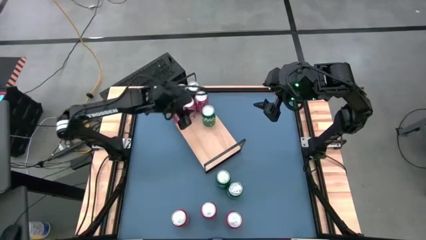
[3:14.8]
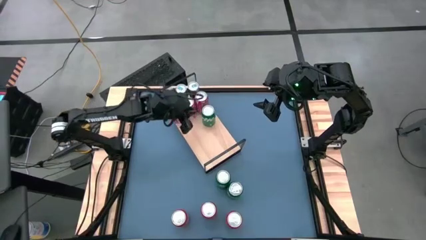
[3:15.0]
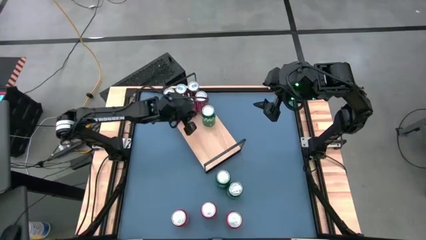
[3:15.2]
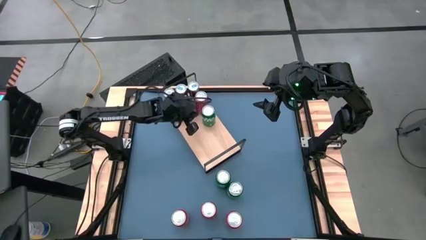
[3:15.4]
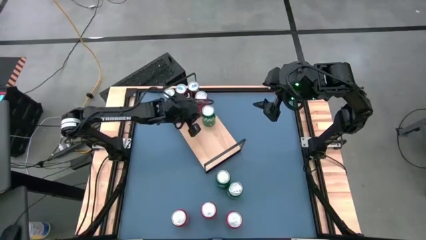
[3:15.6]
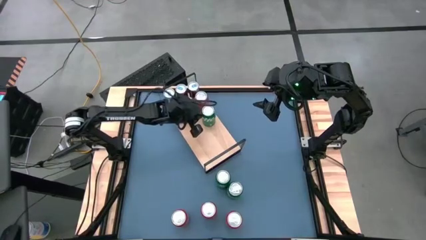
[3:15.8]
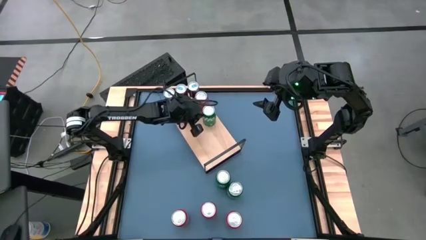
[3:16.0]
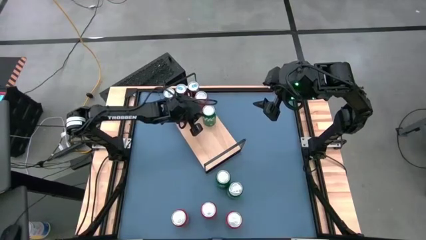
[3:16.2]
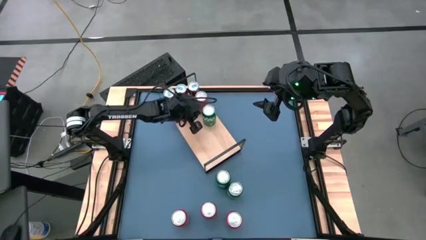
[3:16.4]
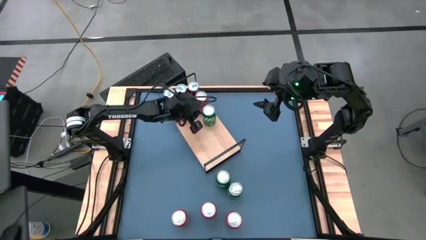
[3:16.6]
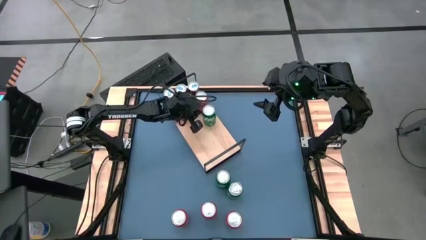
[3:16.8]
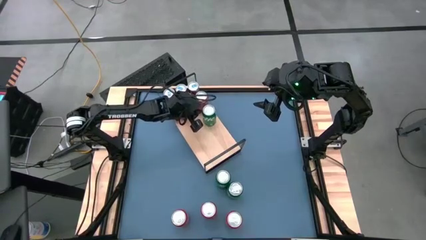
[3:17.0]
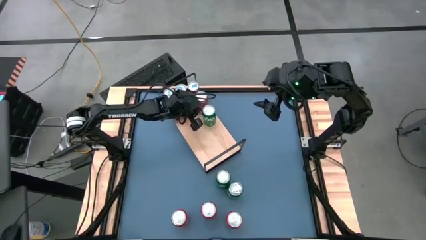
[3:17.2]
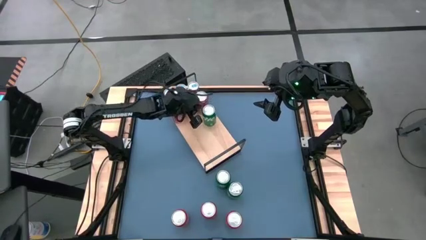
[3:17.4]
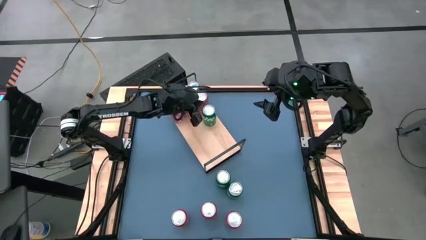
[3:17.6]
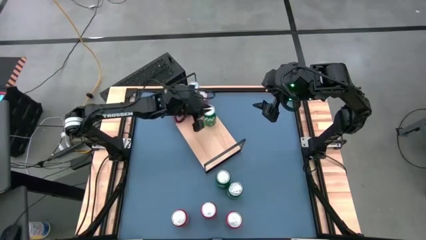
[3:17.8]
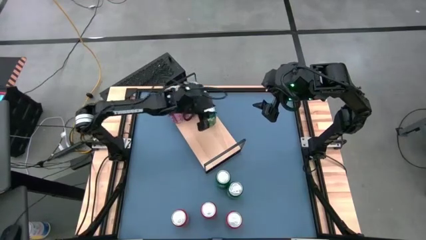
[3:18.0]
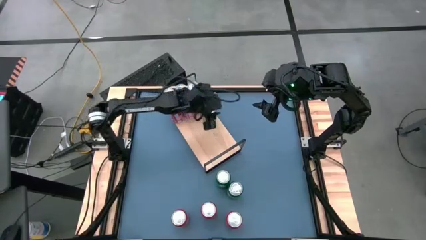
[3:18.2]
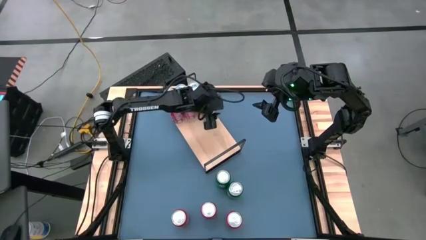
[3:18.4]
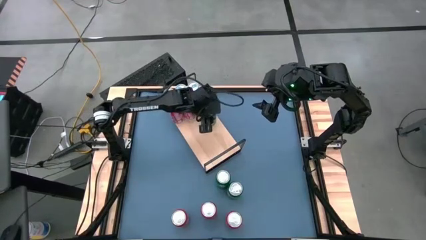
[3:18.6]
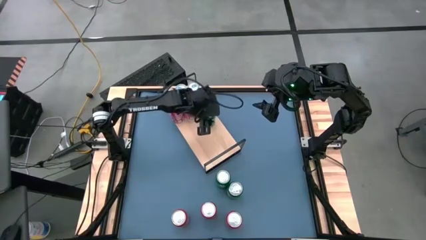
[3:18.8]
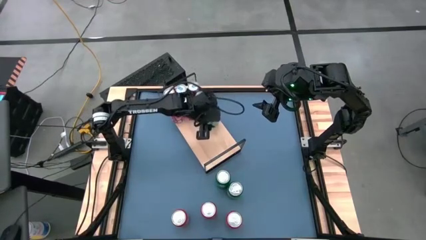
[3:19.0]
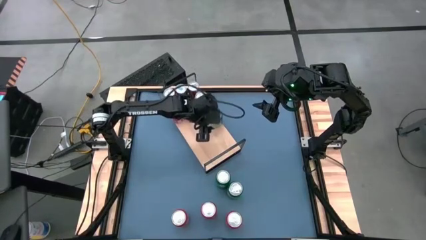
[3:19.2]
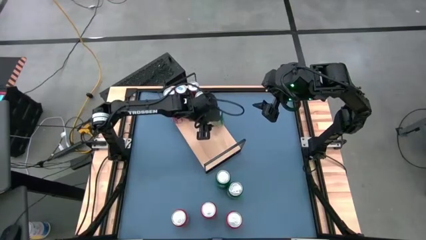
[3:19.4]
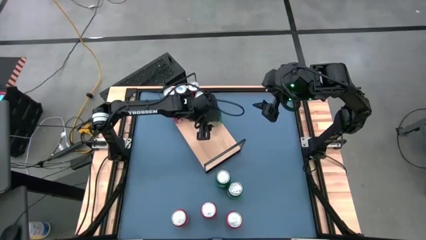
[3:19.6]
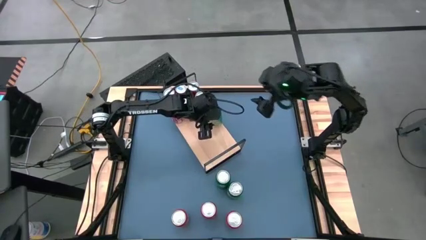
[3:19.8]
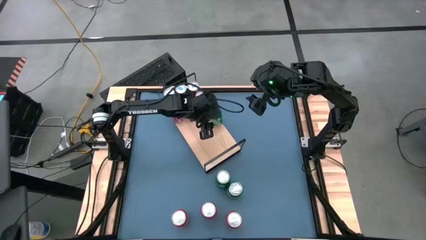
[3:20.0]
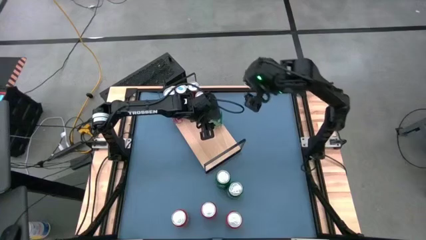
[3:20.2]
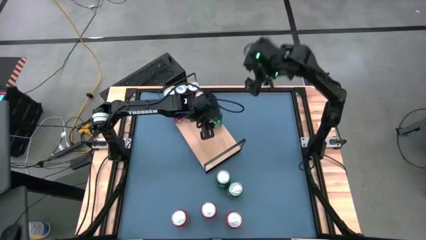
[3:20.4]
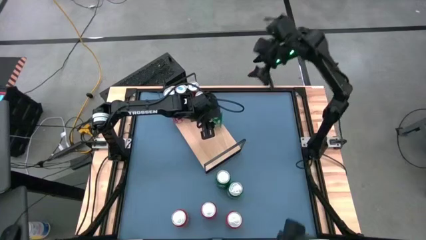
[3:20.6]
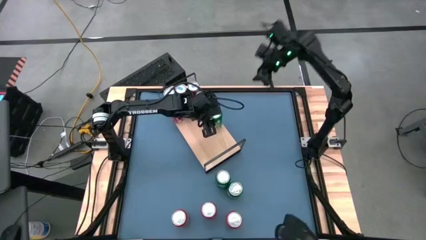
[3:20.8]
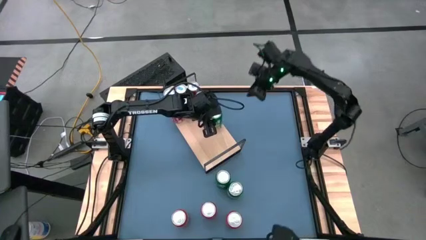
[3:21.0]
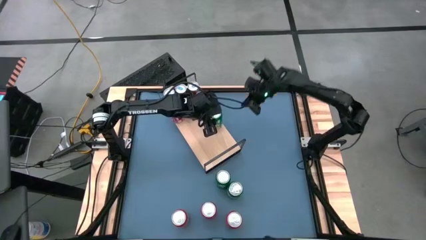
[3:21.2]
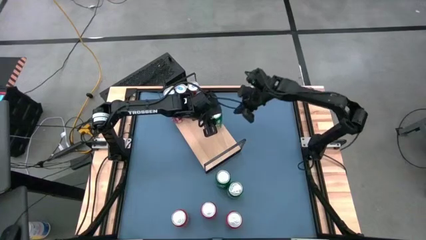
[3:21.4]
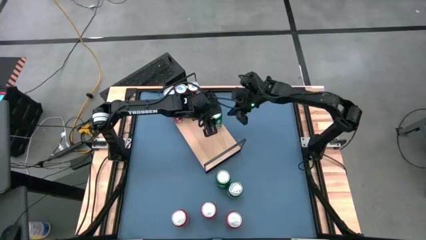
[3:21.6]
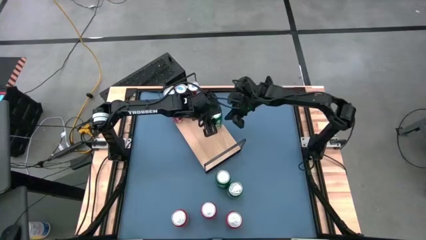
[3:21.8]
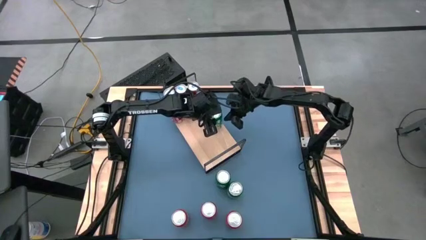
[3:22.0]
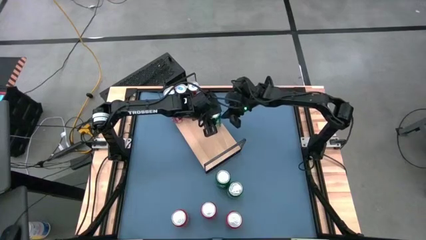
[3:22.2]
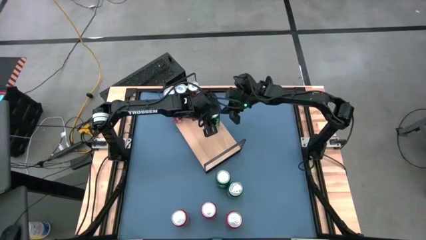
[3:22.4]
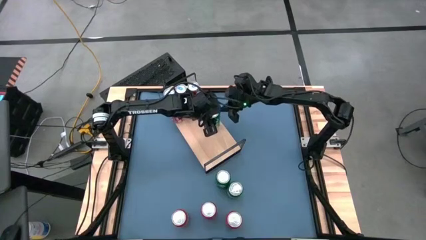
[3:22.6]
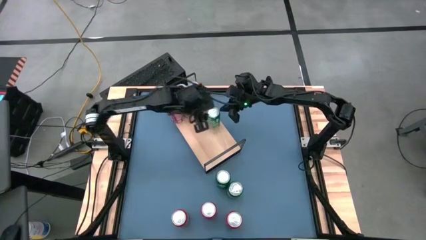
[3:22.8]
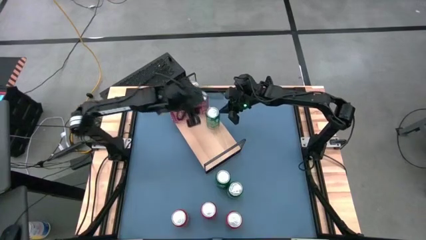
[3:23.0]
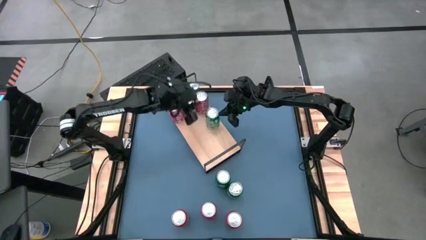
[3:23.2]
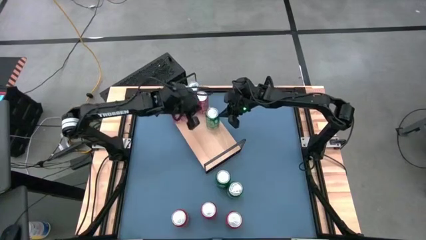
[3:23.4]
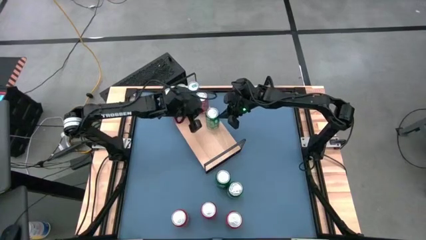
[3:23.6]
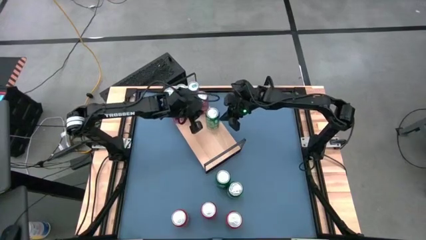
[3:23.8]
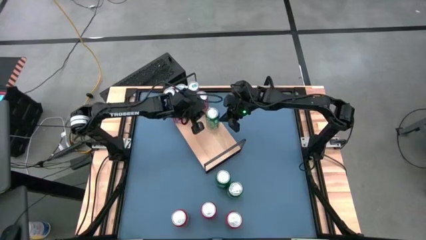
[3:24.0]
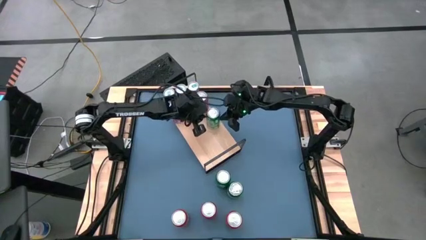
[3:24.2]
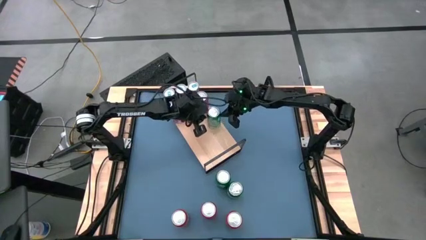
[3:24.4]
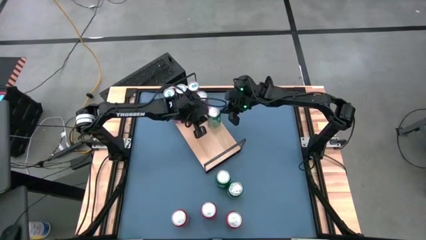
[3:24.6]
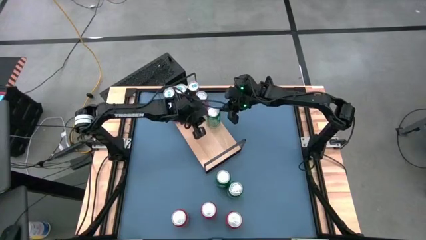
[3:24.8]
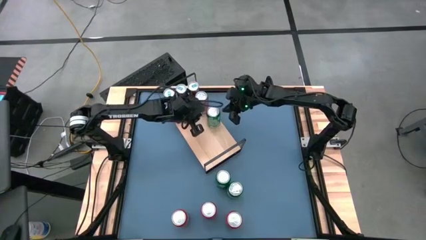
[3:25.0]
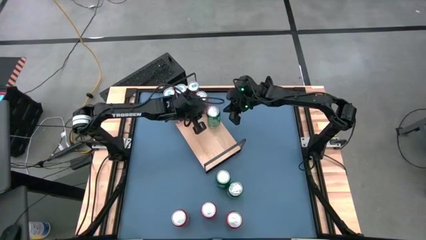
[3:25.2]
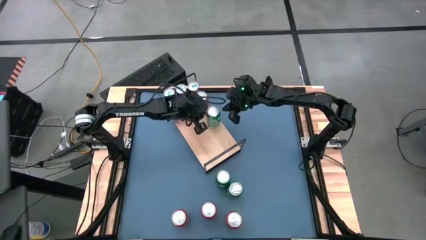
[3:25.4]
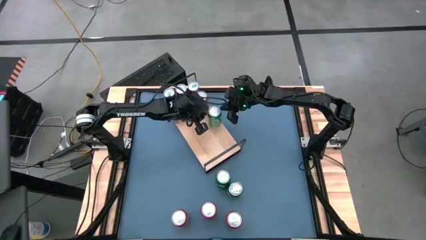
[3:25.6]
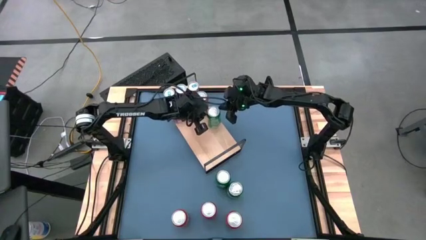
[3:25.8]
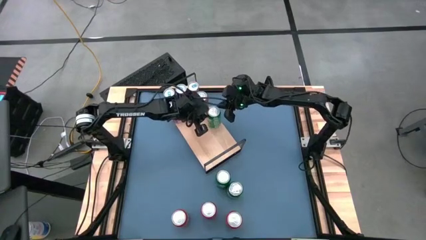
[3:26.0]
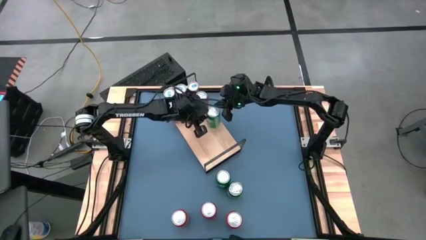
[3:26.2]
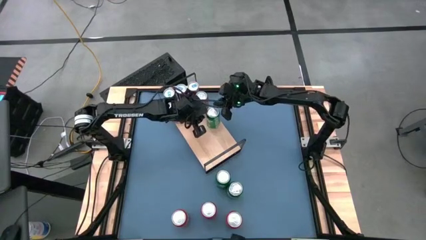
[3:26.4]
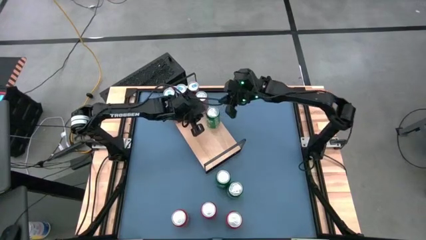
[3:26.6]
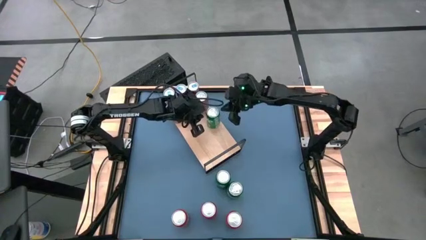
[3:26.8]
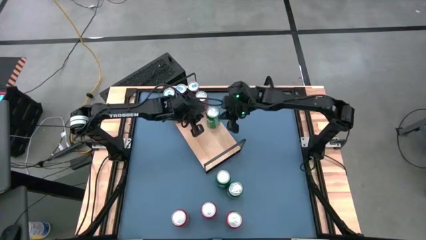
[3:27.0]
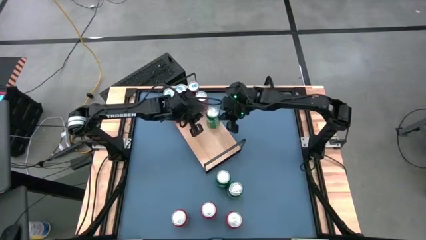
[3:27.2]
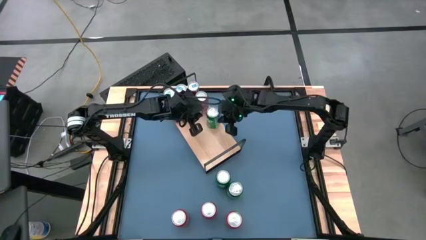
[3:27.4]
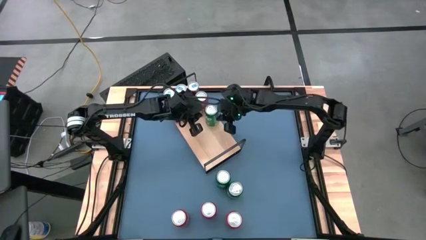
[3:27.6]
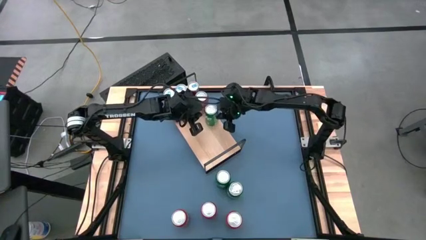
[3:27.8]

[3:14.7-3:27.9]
Task: Place canned beverage on shelf
Put the bottom green soda can on the shelf
